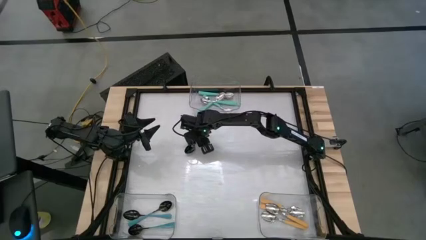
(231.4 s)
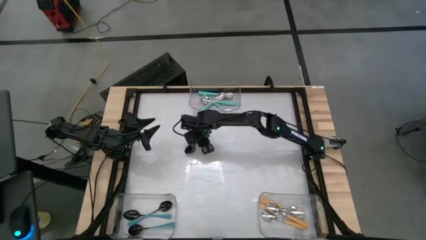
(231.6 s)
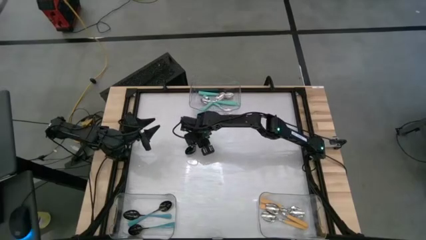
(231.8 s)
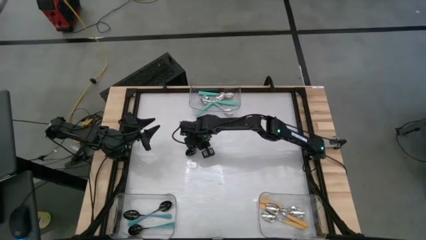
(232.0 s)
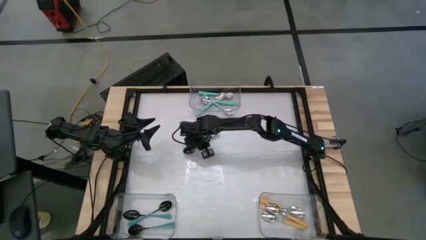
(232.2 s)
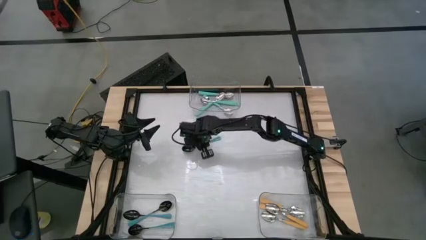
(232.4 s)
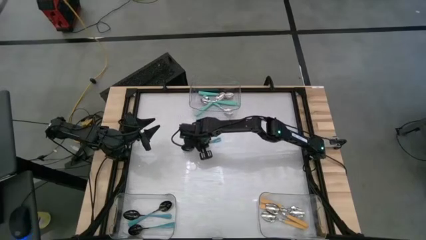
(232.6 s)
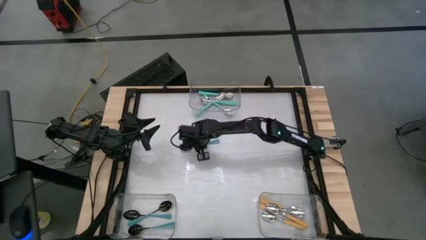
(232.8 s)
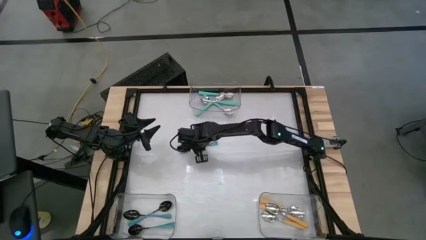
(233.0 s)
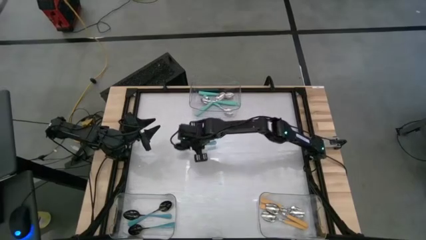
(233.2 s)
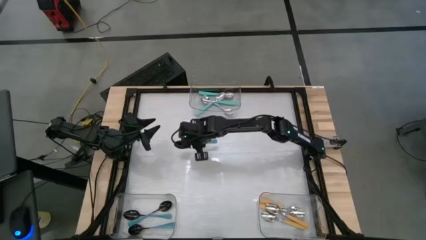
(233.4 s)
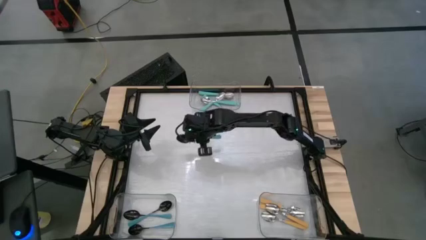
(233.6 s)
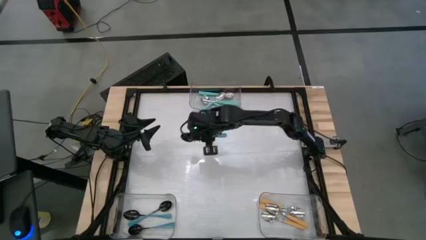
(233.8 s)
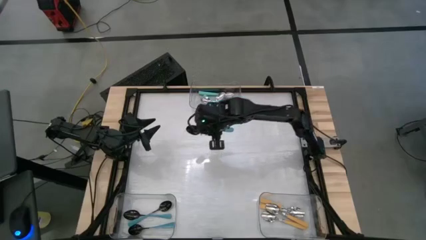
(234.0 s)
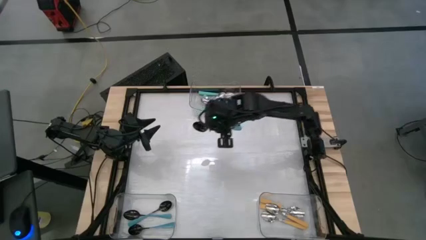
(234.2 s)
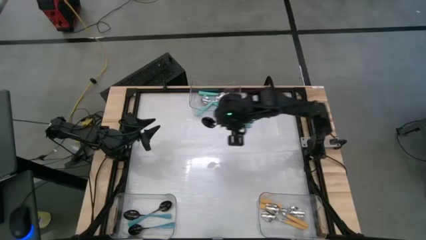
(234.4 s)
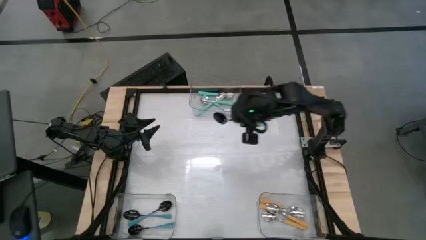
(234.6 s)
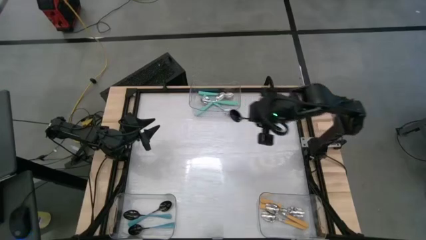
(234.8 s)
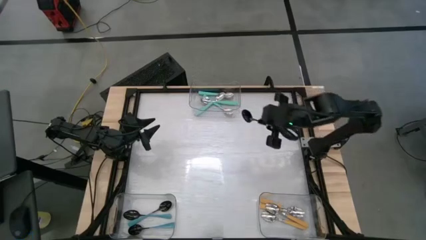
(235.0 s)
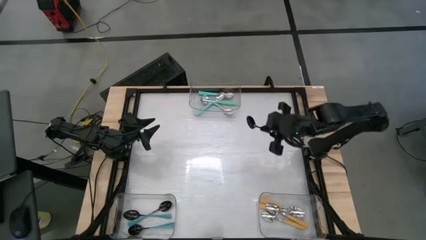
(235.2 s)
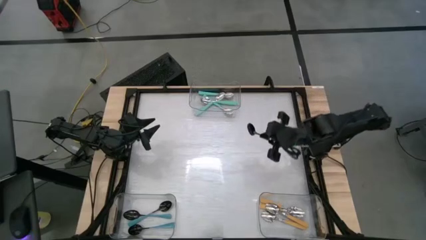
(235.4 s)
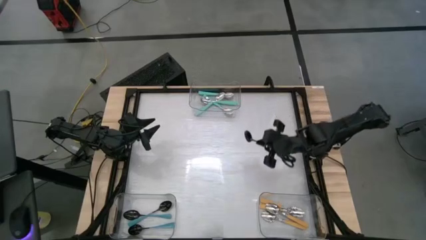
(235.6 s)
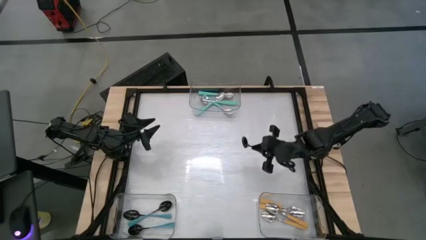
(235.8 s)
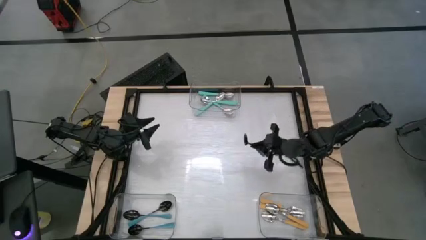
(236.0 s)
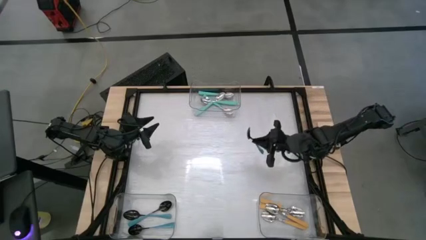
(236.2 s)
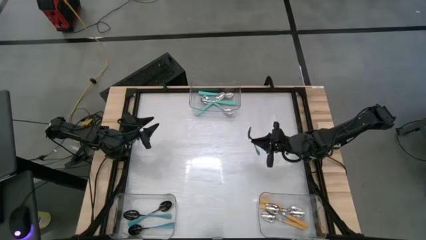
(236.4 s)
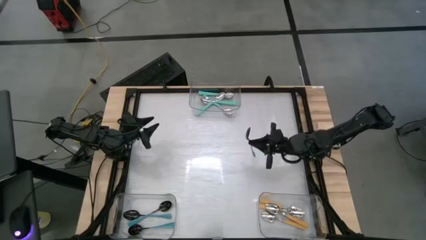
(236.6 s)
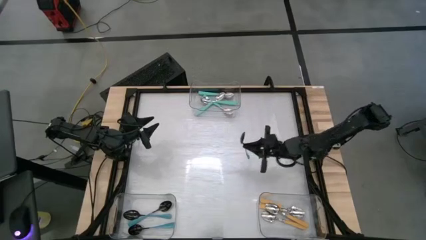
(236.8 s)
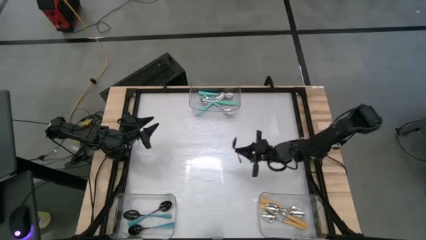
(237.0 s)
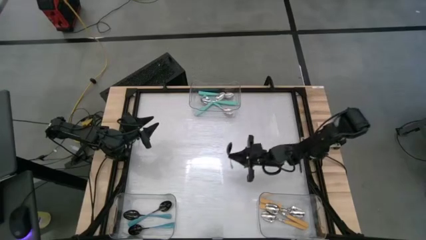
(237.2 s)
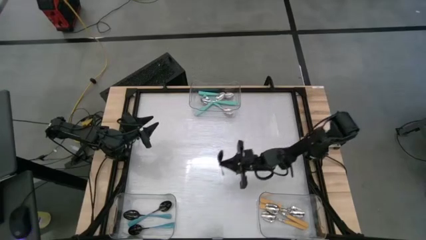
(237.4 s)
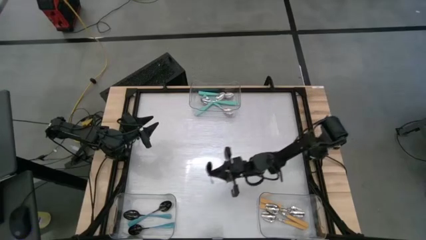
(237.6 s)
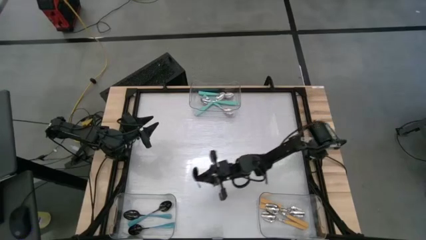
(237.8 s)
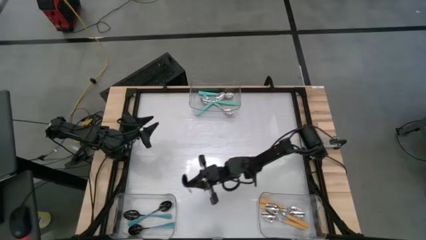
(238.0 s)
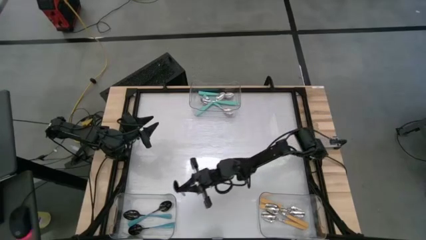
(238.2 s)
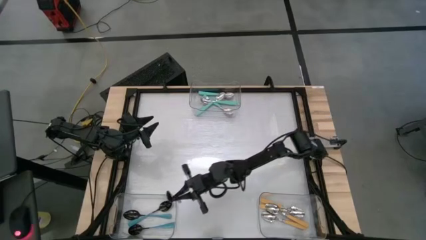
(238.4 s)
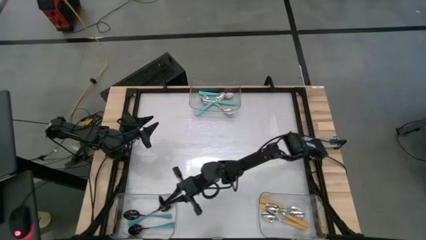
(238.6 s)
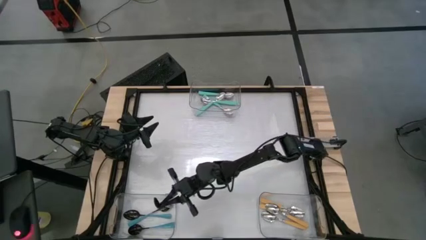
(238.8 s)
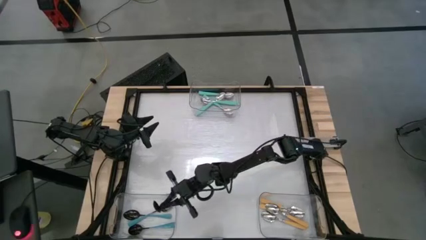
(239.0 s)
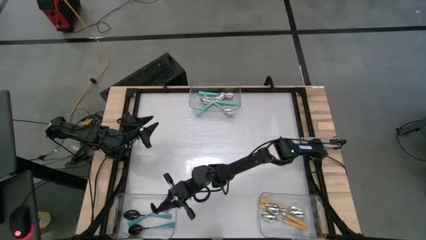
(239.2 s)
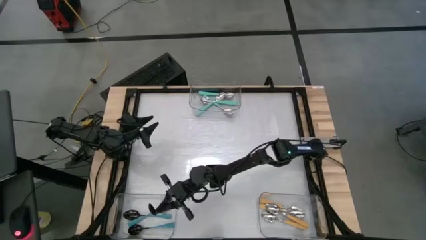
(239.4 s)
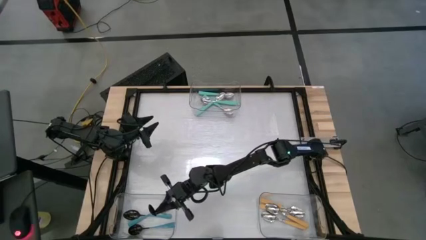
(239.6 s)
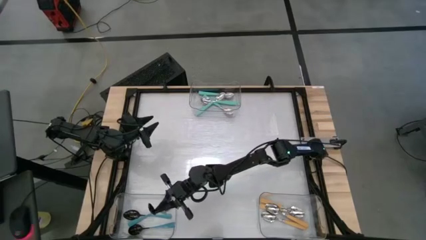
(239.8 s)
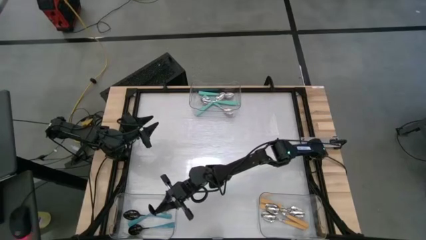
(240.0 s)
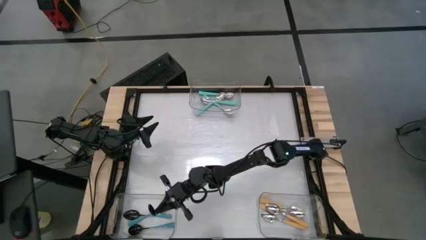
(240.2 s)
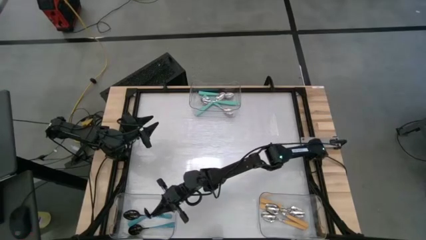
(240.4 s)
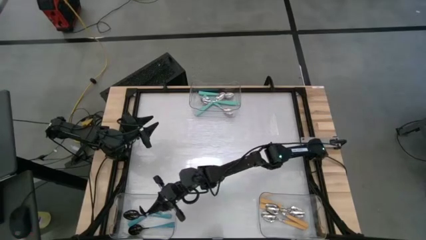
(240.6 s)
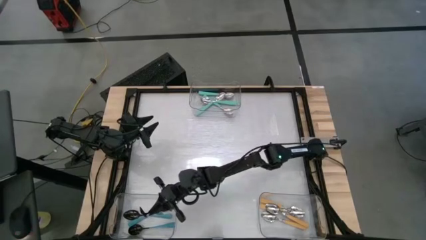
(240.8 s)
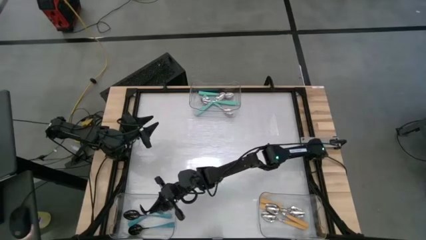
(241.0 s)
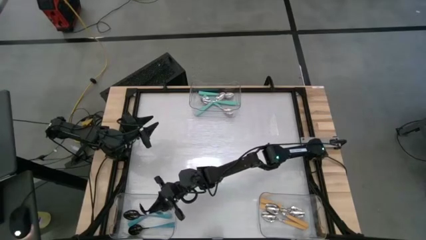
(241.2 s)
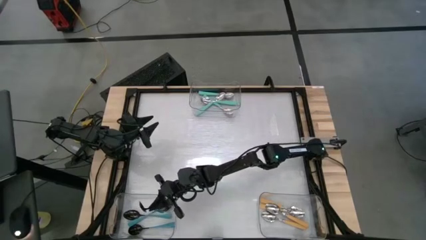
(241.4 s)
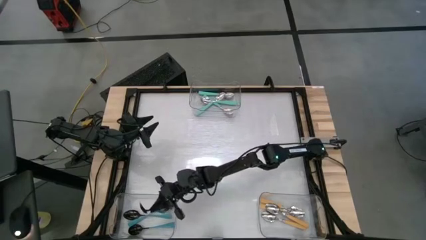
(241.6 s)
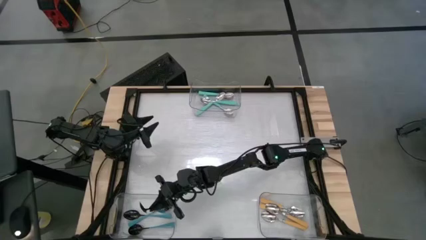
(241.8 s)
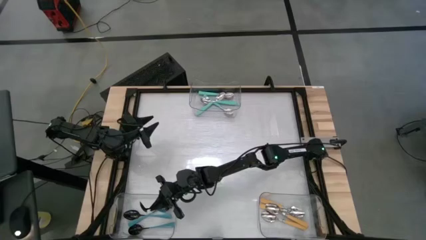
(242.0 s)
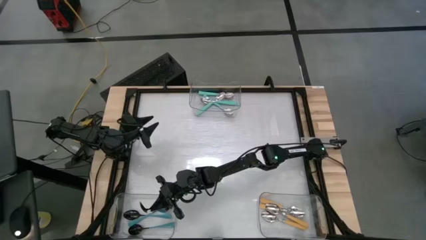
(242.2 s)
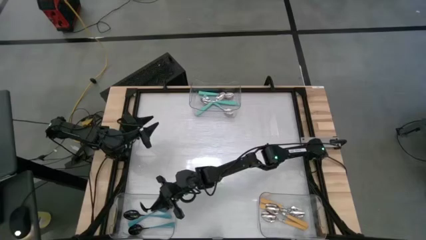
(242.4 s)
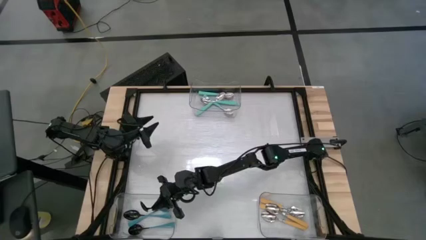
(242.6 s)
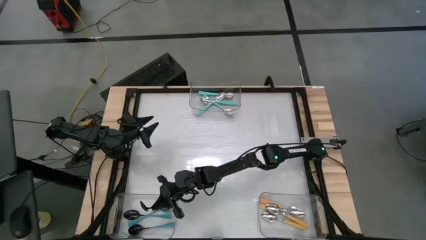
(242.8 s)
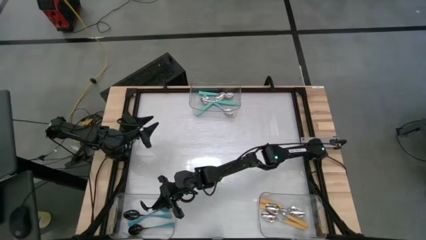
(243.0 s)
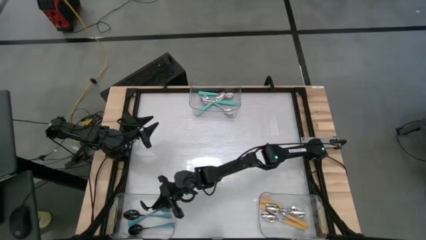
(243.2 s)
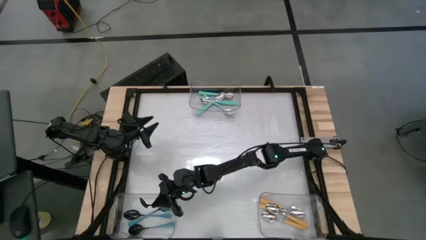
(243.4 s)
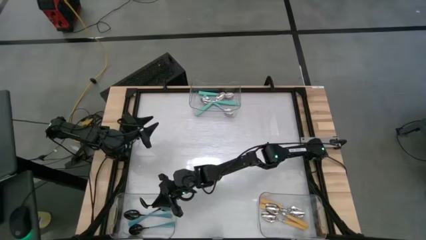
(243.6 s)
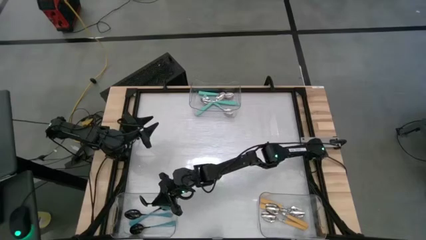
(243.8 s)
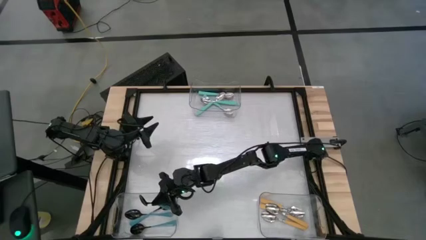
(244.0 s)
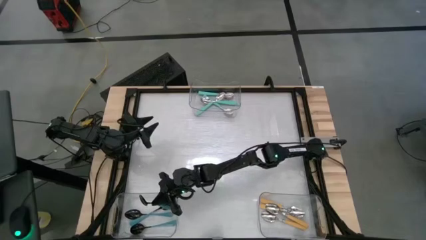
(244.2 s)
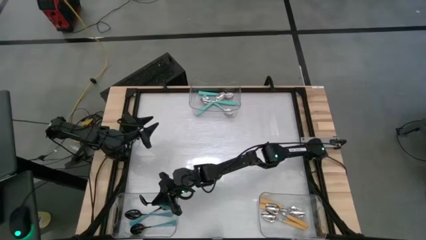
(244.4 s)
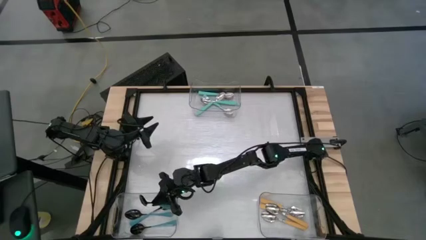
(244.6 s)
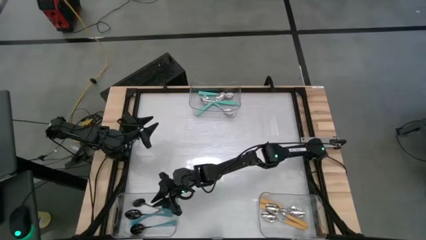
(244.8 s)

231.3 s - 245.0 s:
Task: Sort silverware by color (type)
Put the black spoon into the bottom left transparent bin

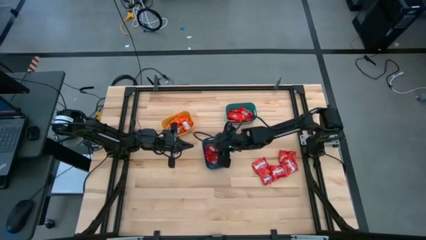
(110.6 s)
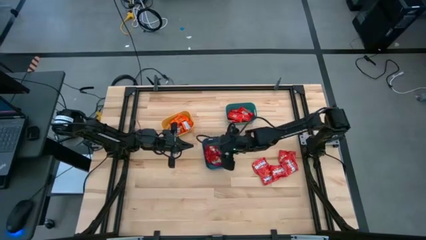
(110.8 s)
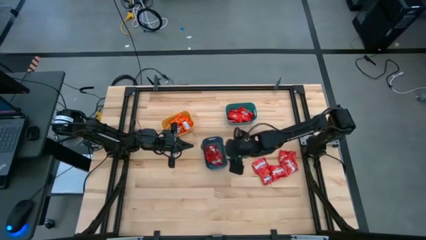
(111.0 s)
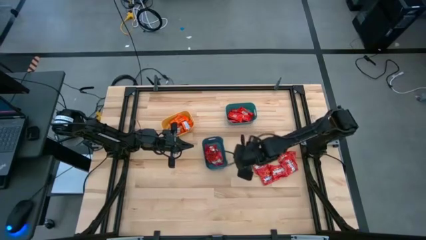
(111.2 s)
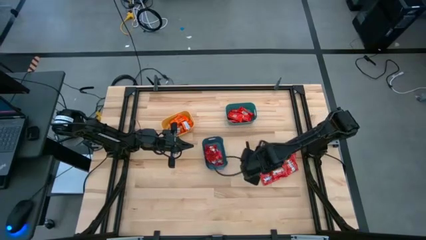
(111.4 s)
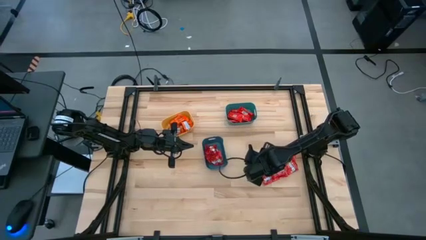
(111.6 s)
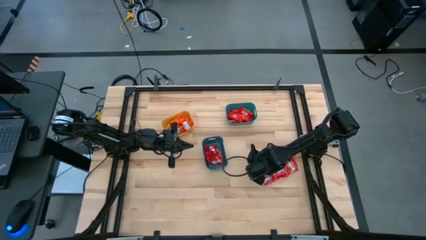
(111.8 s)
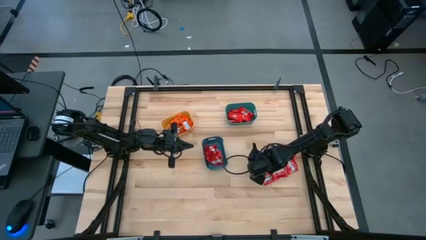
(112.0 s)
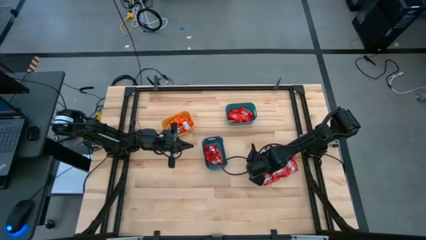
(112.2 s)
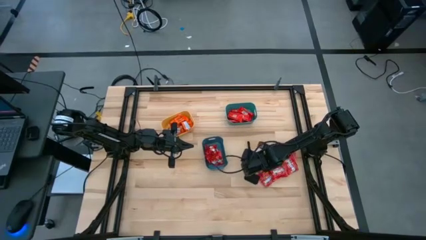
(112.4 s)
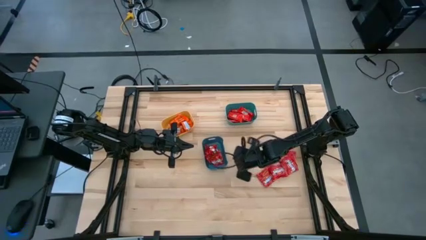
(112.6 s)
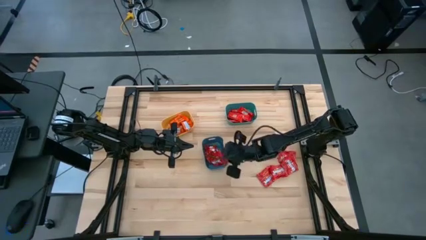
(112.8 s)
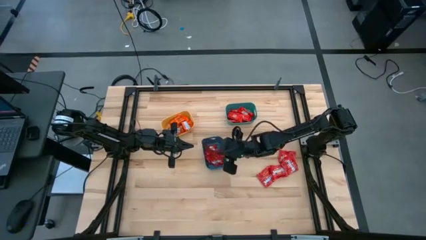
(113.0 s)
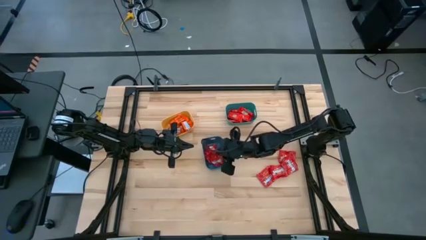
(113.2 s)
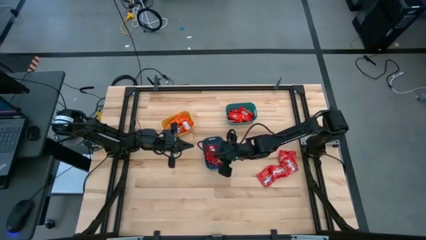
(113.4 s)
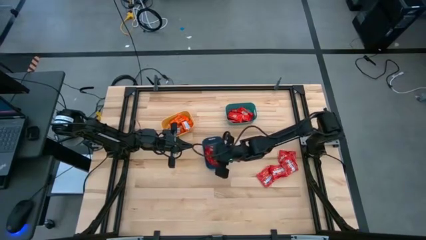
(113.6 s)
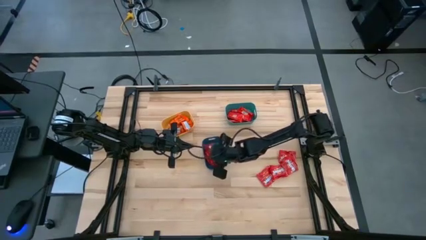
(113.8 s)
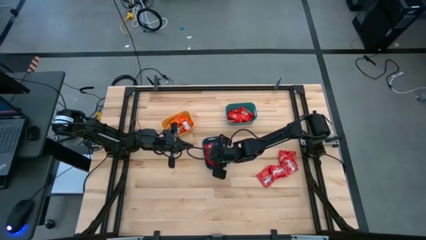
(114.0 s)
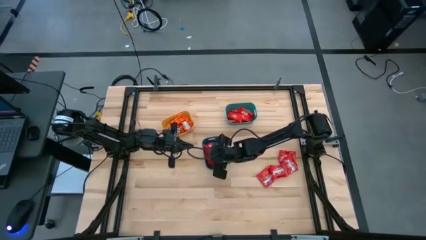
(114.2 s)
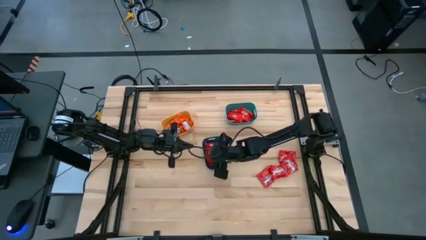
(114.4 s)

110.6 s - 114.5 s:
Task: Sort candy
Put the red candy into the blue bin
